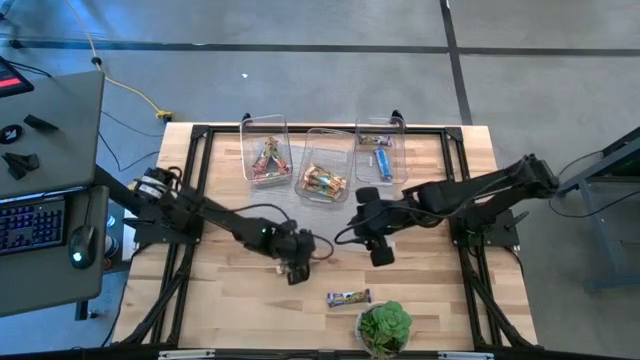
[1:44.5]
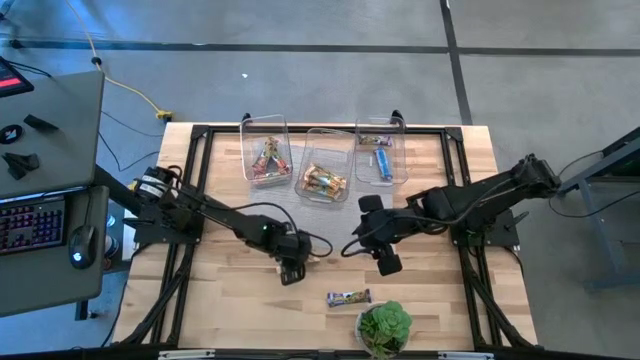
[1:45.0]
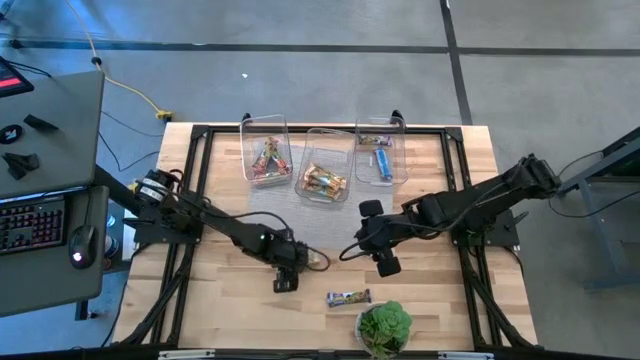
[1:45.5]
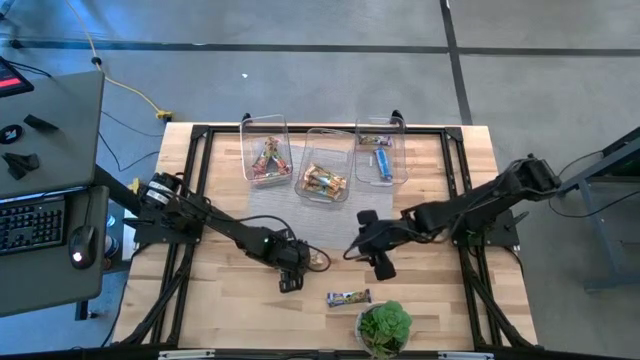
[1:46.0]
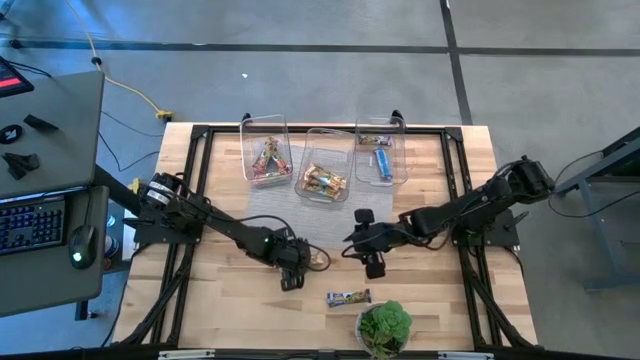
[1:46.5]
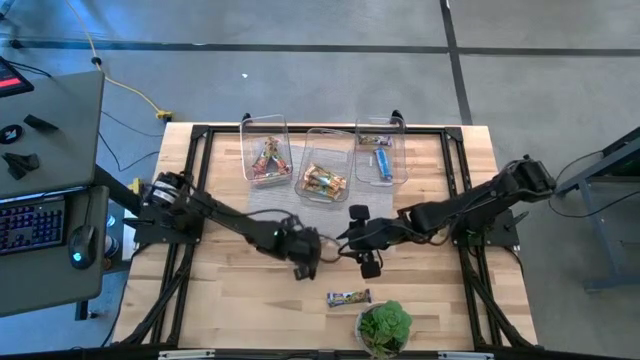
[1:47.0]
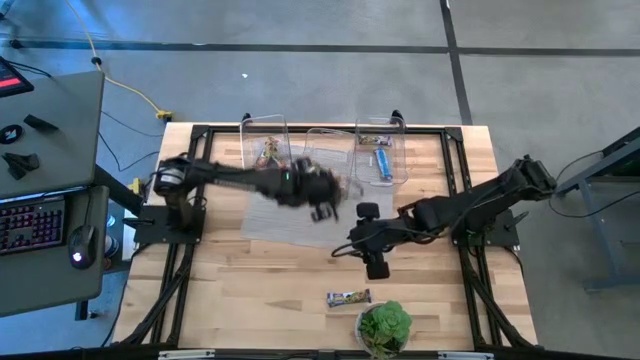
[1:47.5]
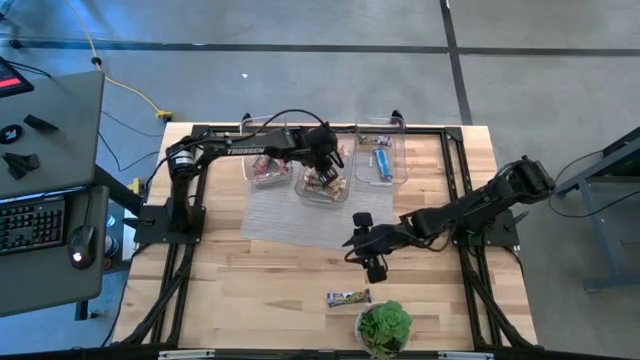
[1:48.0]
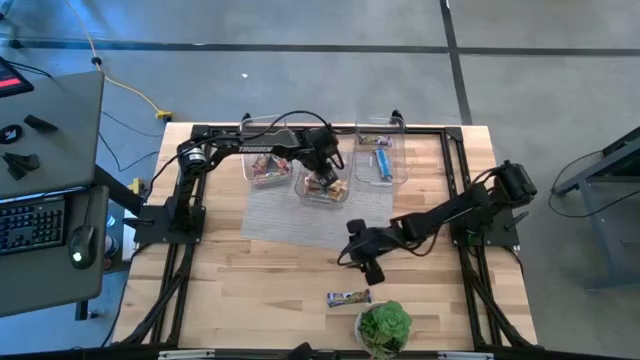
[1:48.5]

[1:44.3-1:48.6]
Task: Pick and place Granola Bars by type
Put the orange granola bar into the middle transparent bin

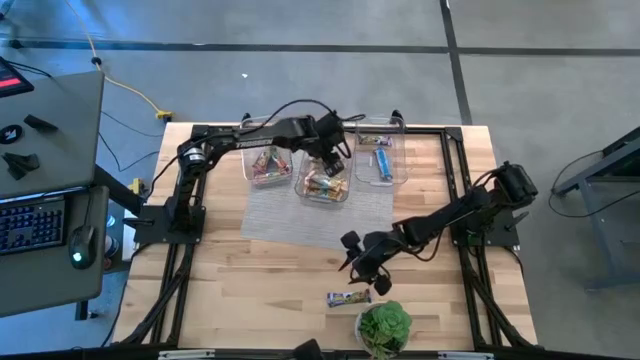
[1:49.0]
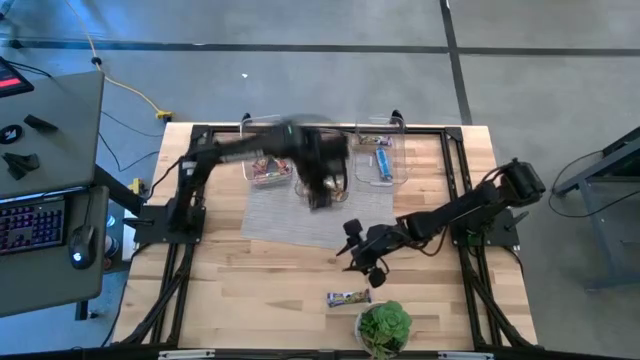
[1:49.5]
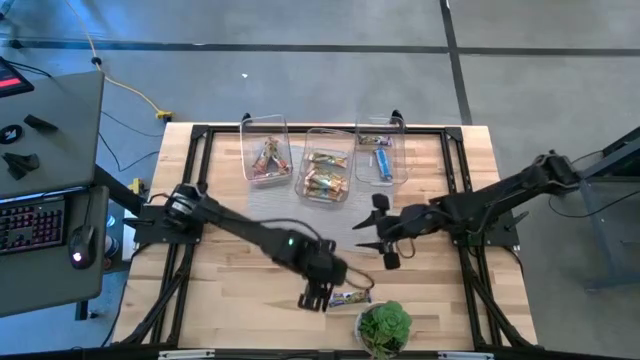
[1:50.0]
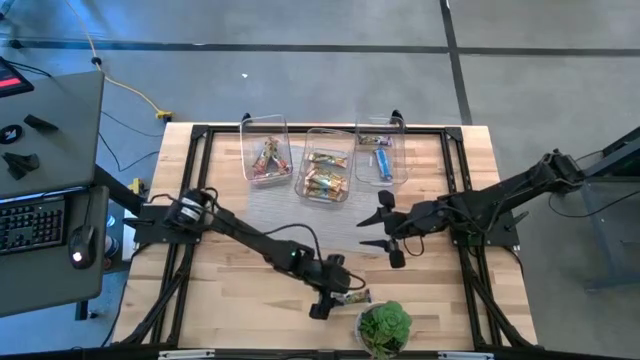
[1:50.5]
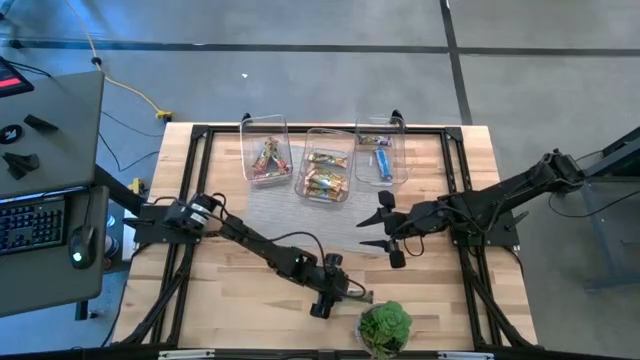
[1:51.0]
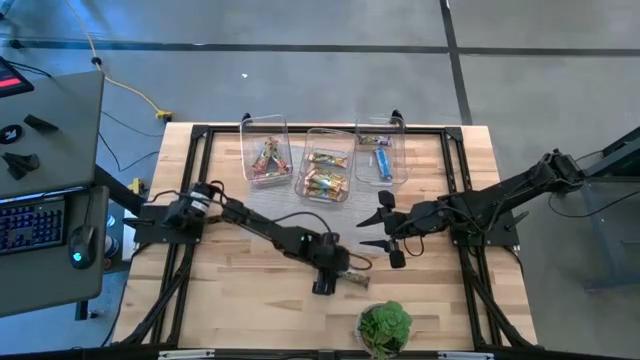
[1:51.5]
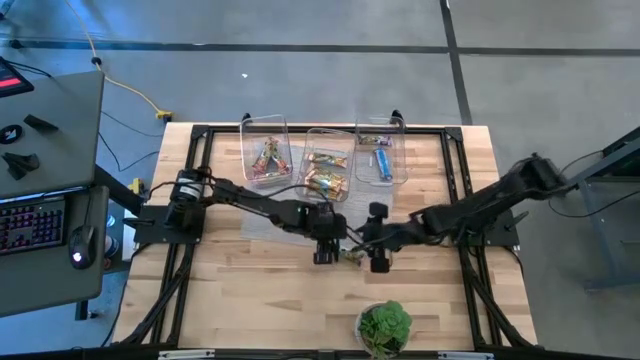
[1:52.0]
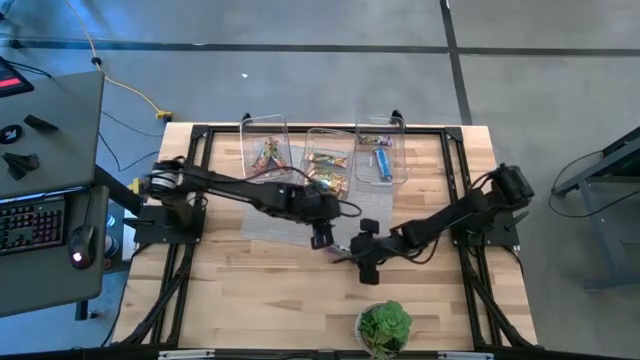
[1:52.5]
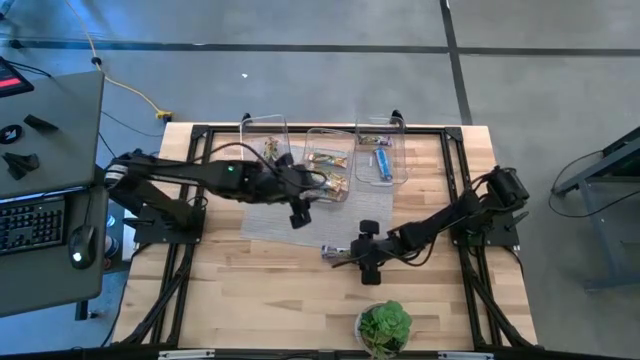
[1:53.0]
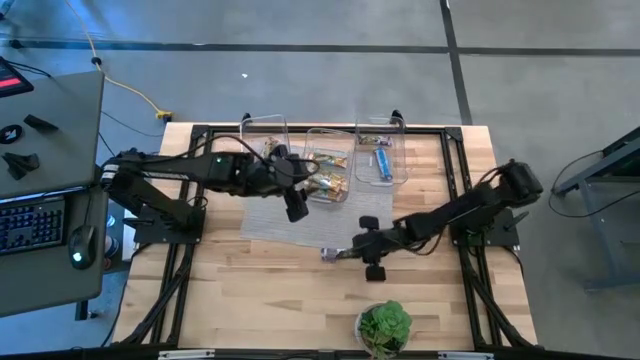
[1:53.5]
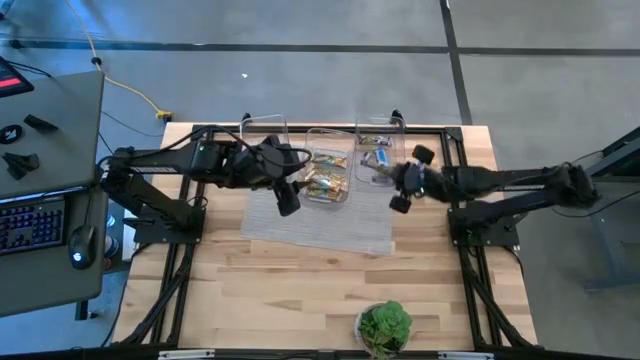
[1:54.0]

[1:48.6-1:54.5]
Put the blue granola bar into the right transparent bin

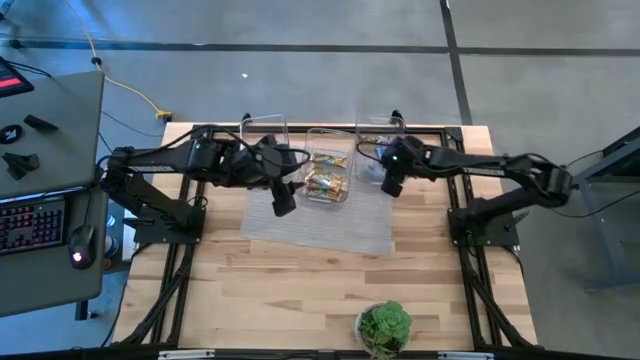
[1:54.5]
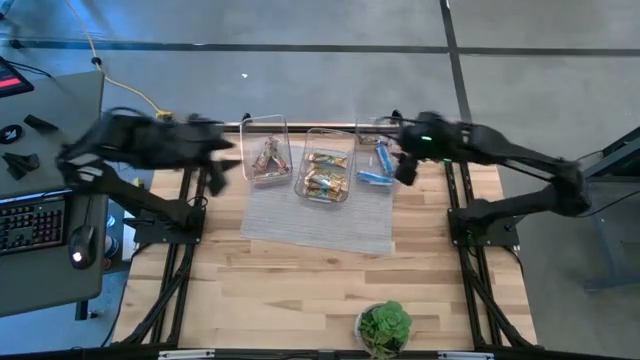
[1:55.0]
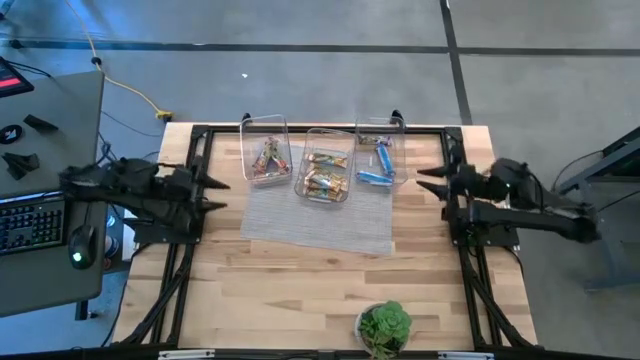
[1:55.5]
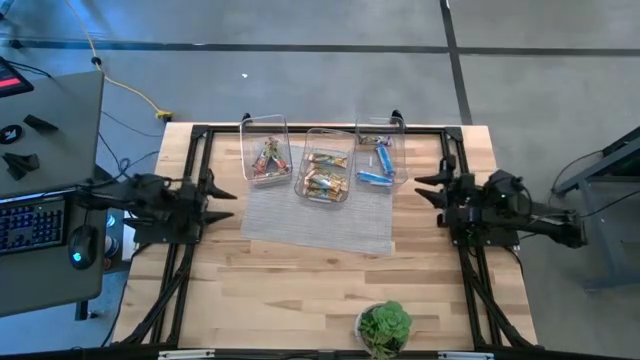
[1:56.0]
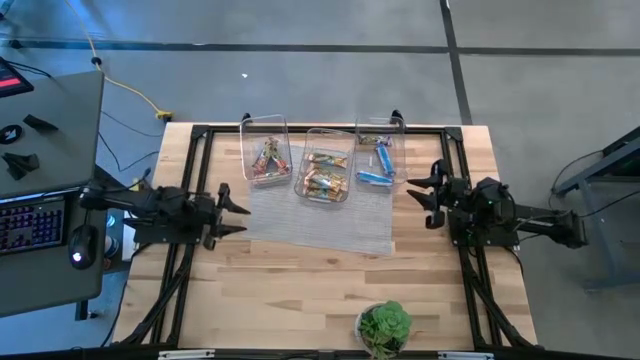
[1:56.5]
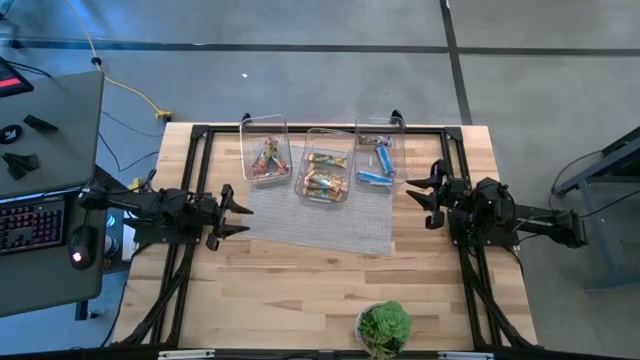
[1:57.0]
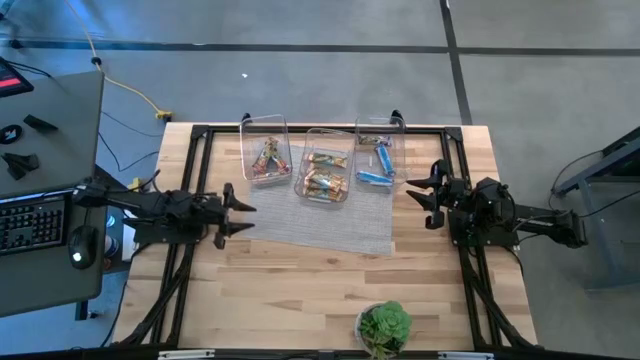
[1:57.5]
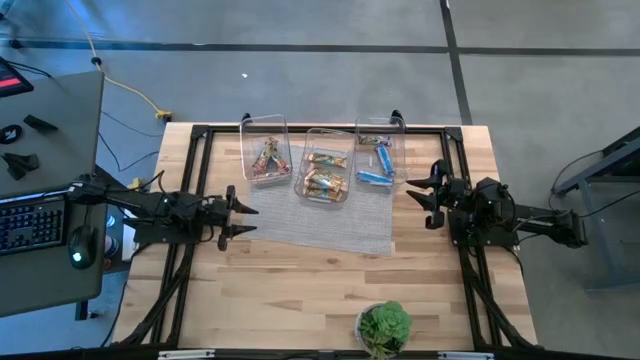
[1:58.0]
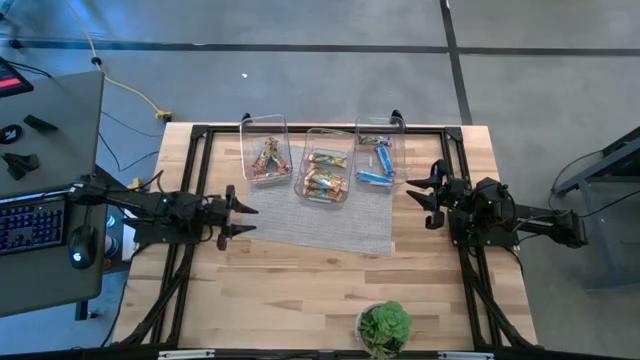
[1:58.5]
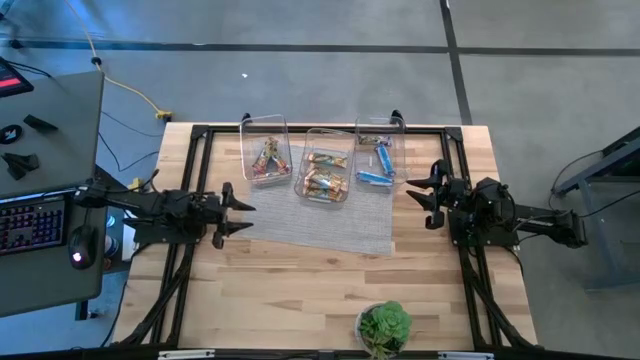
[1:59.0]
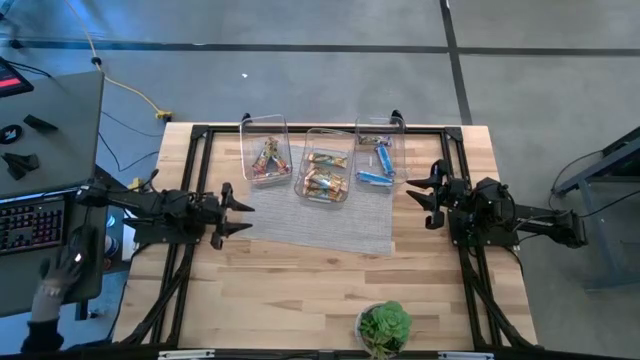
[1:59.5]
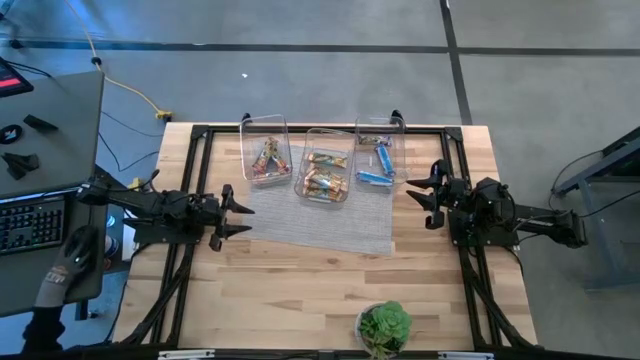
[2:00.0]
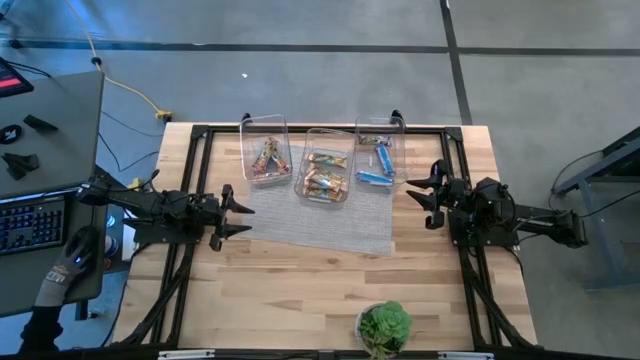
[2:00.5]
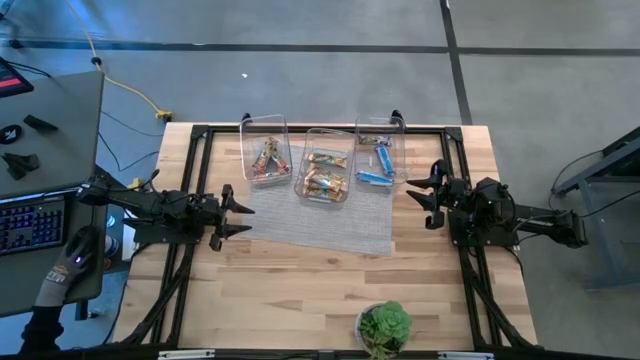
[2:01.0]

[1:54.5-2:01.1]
Return to Home Position

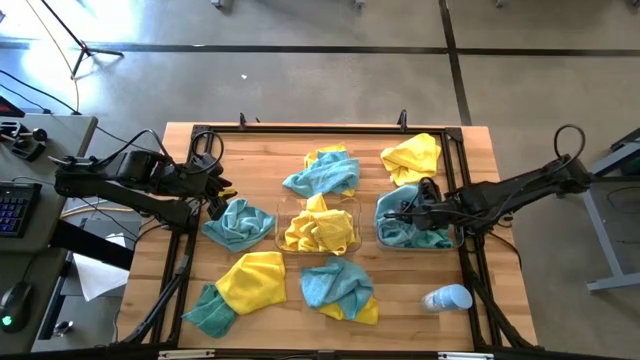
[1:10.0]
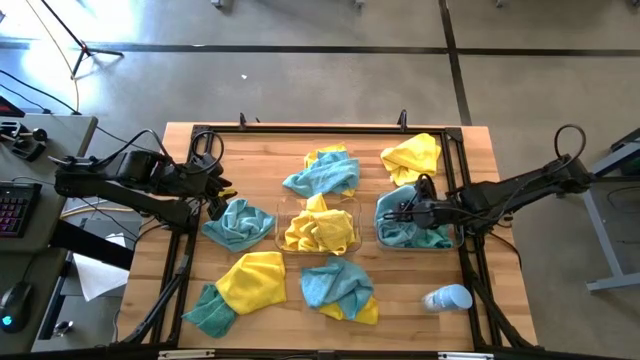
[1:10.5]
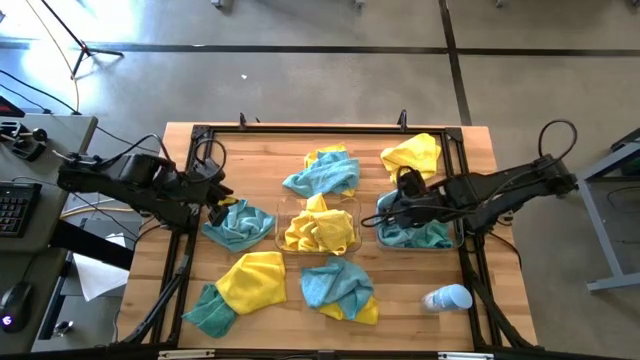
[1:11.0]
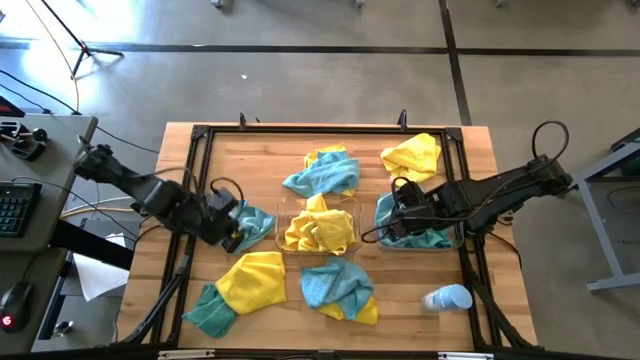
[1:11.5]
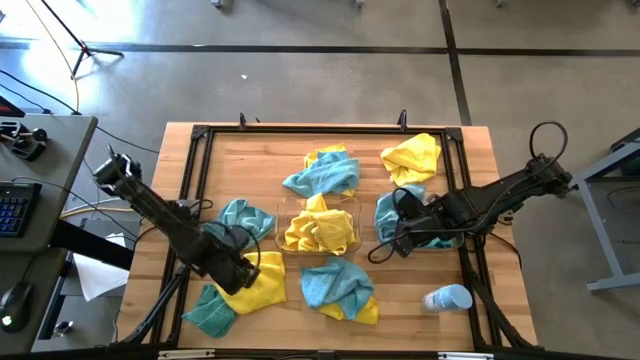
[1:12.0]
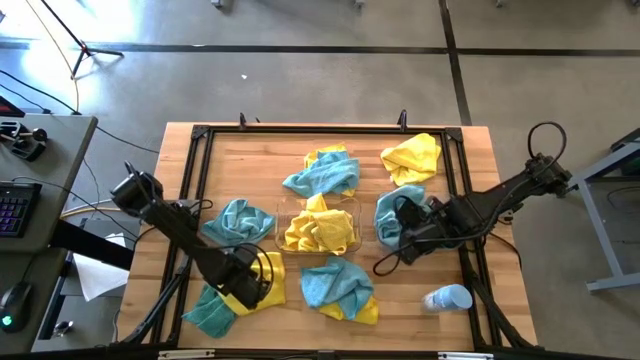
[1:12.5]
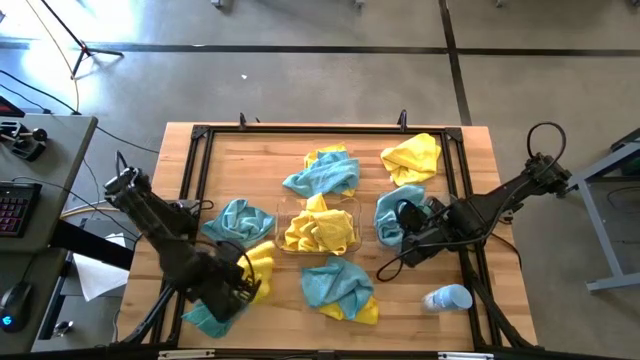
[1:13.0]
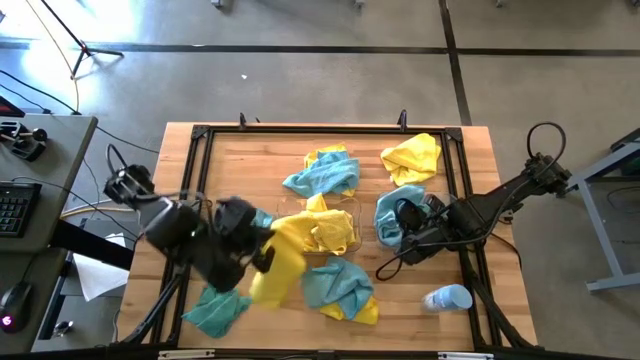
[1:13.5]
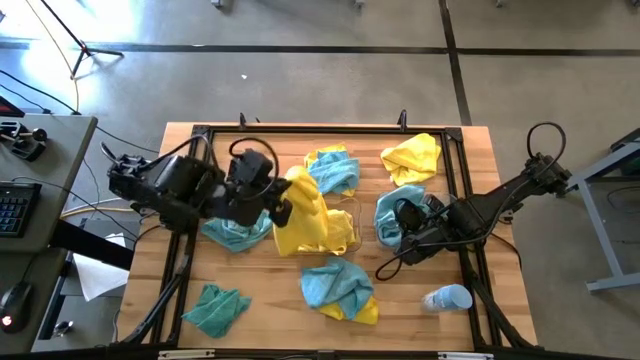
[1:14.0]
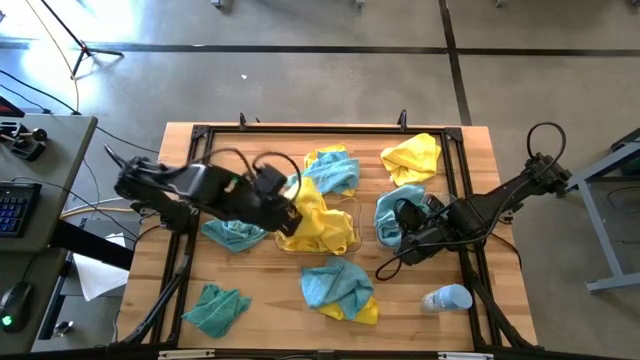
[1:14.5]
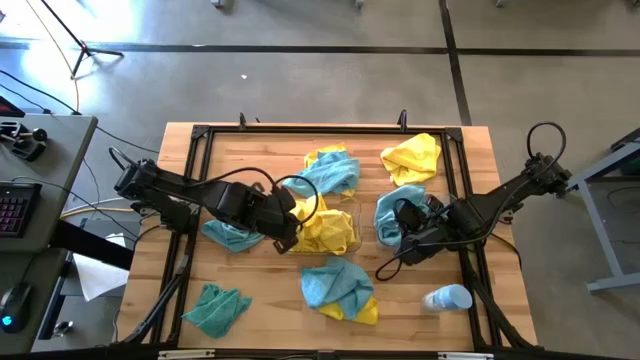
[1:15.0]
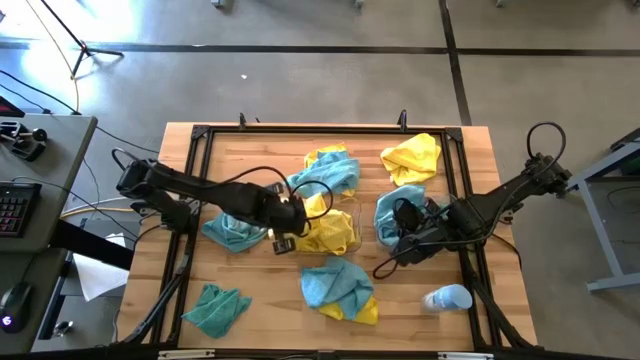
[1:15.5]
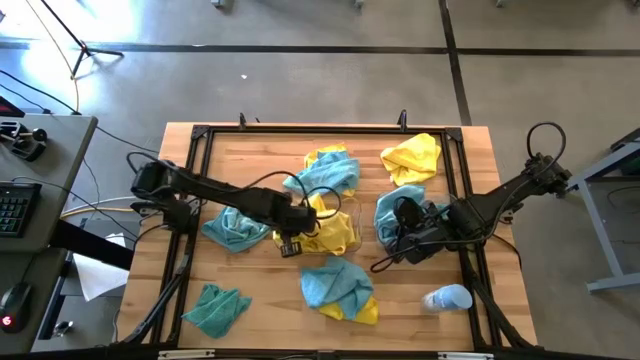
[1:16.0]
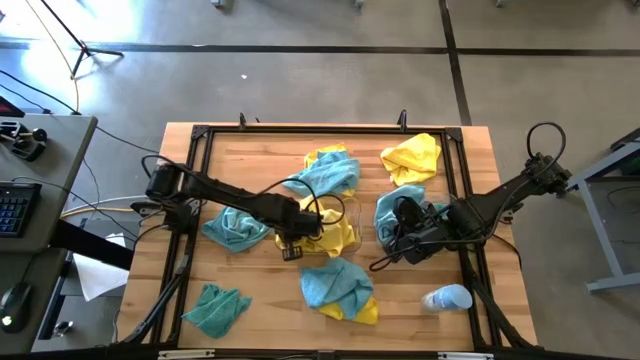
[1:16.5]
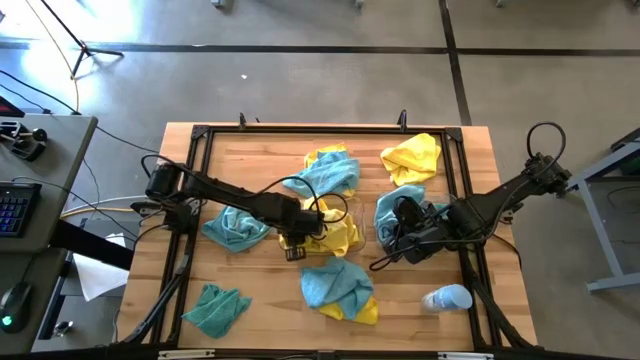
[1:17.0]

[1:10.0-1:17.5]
Task: Sort microfiber towel by color & place in baskets
Put the yellow microfiber cloth into the left transparent bin
